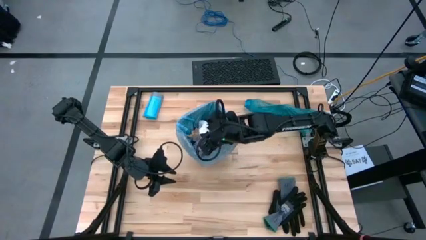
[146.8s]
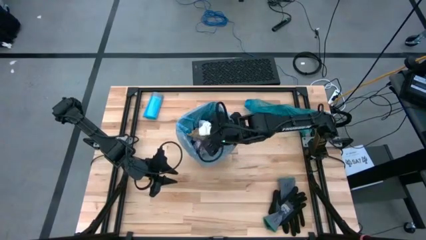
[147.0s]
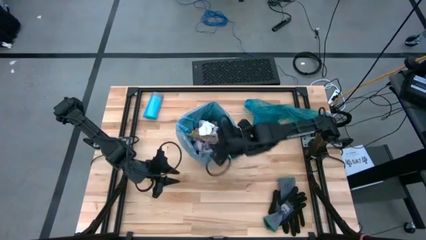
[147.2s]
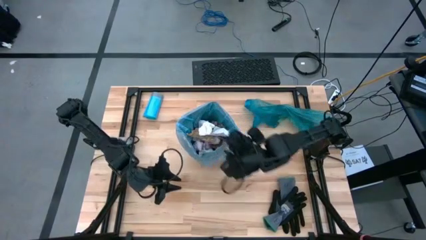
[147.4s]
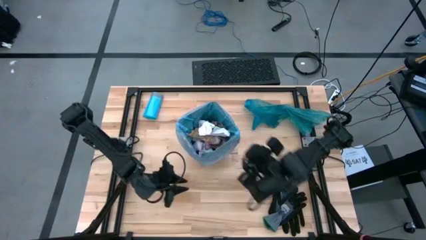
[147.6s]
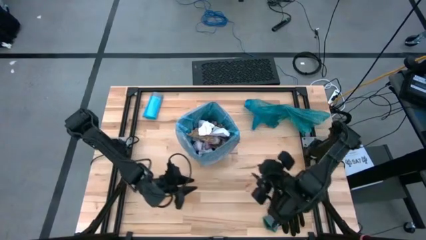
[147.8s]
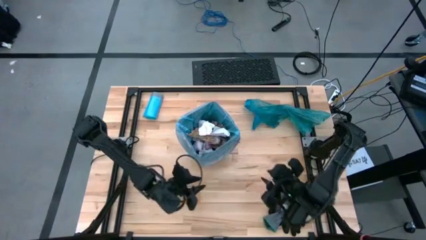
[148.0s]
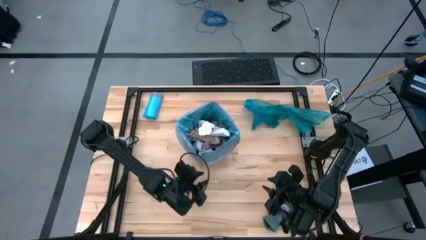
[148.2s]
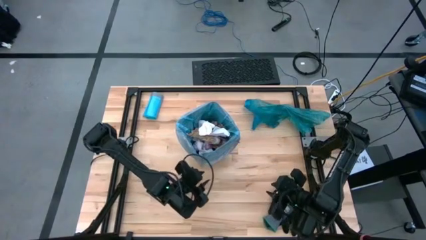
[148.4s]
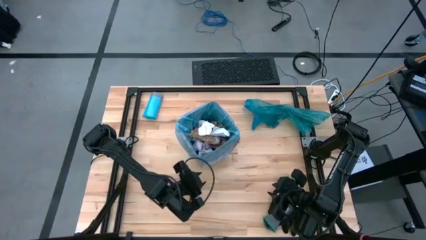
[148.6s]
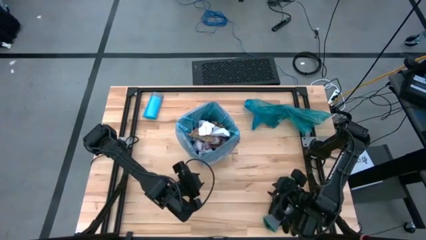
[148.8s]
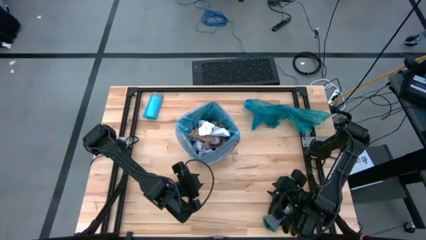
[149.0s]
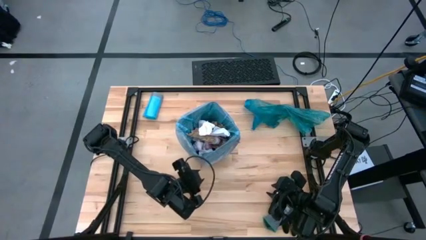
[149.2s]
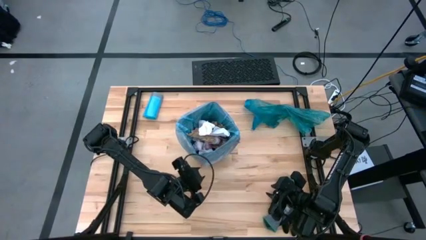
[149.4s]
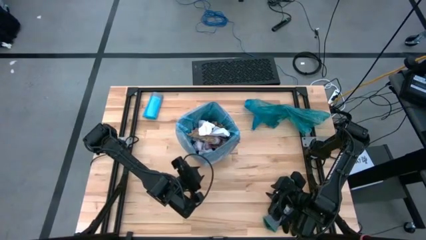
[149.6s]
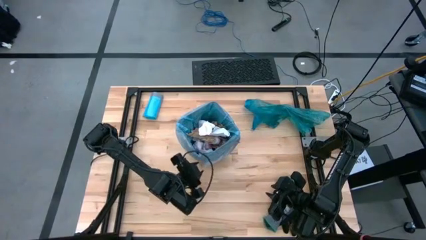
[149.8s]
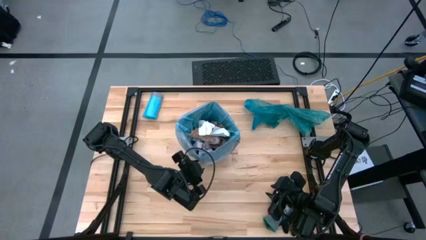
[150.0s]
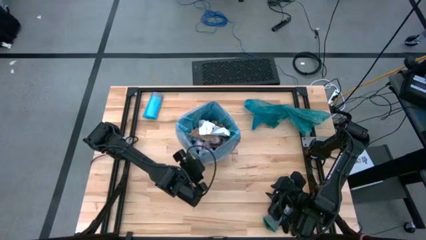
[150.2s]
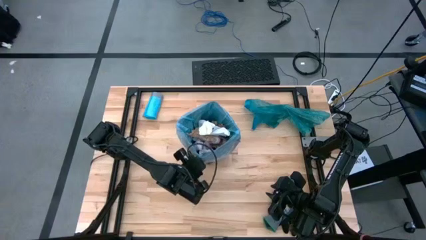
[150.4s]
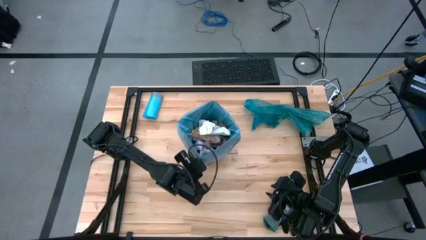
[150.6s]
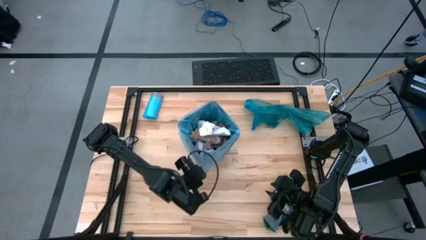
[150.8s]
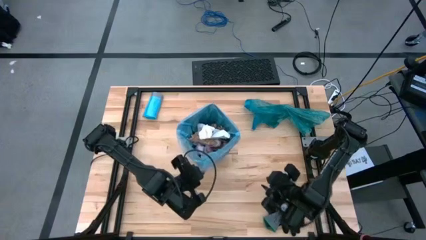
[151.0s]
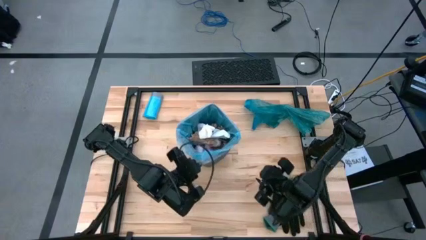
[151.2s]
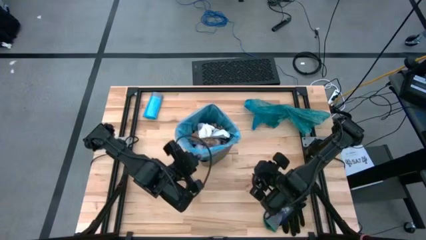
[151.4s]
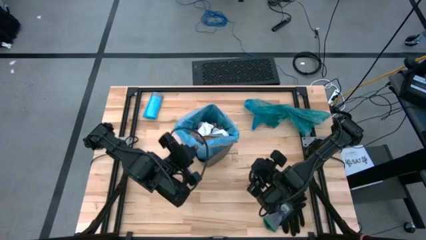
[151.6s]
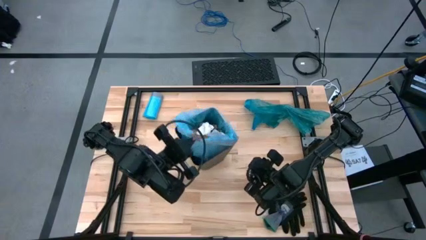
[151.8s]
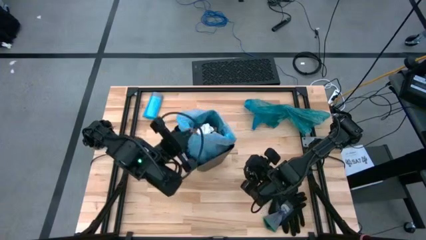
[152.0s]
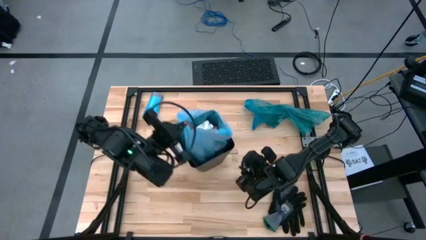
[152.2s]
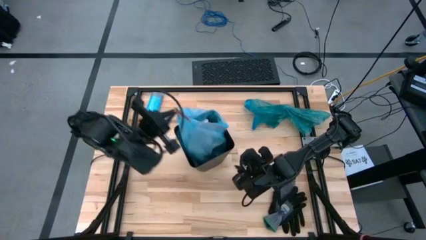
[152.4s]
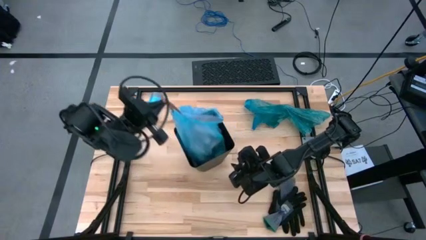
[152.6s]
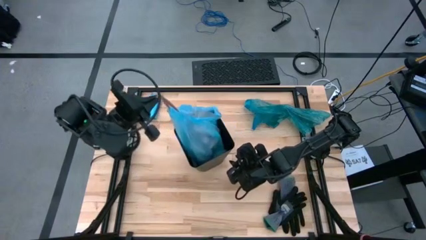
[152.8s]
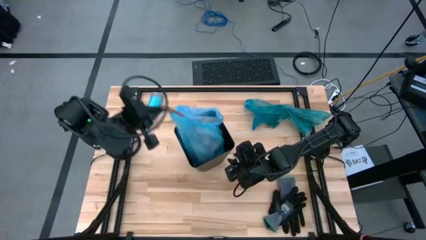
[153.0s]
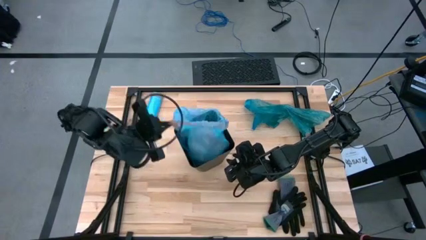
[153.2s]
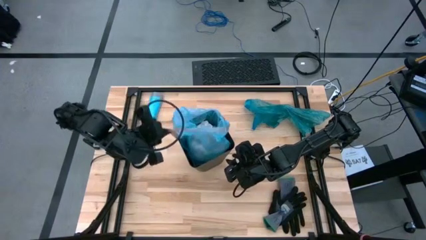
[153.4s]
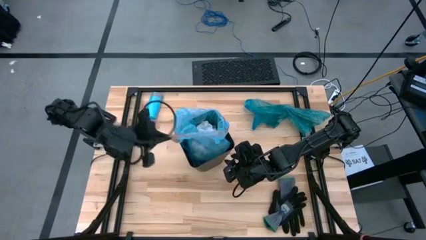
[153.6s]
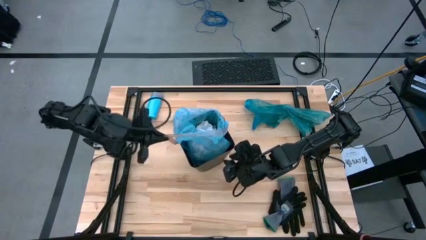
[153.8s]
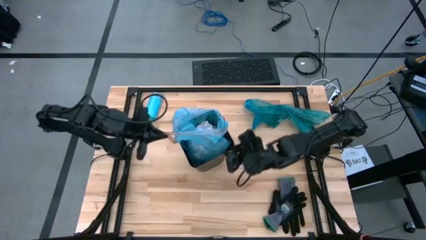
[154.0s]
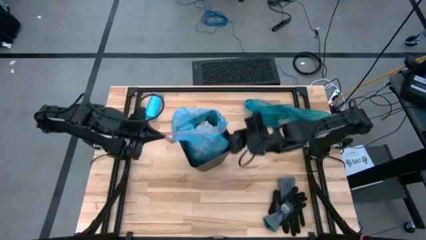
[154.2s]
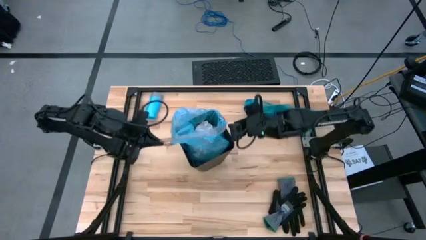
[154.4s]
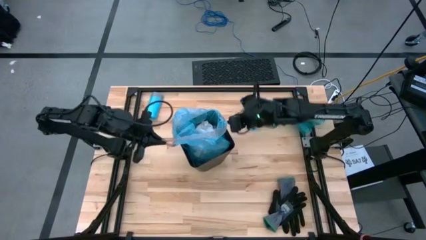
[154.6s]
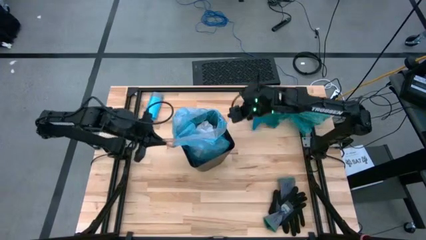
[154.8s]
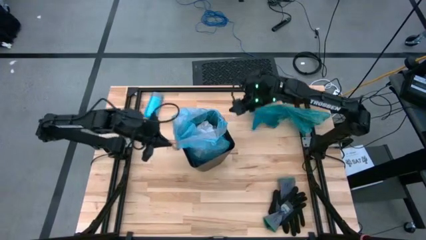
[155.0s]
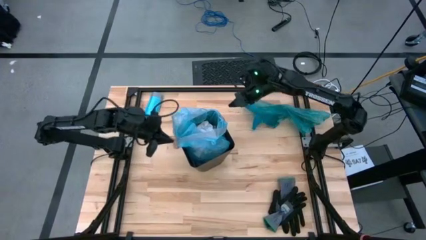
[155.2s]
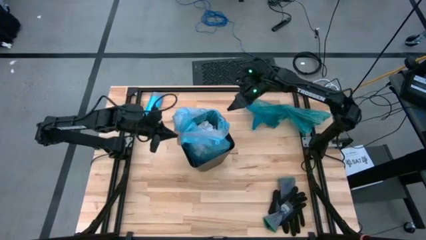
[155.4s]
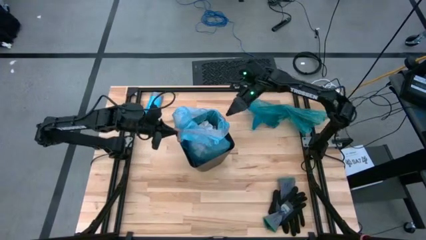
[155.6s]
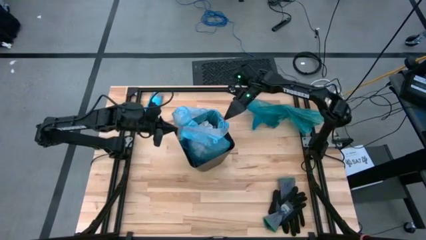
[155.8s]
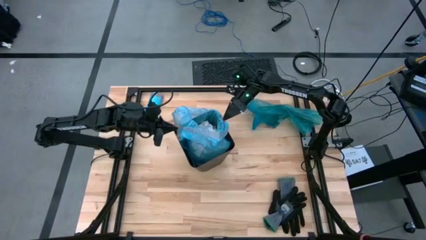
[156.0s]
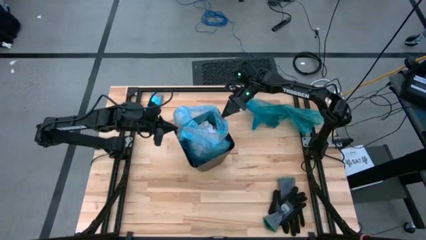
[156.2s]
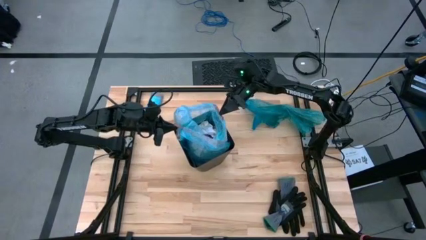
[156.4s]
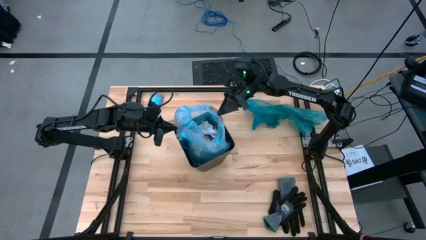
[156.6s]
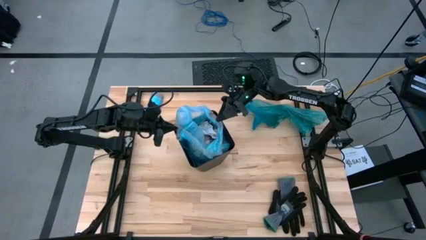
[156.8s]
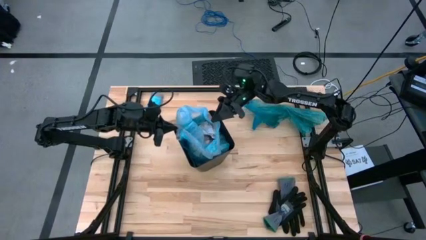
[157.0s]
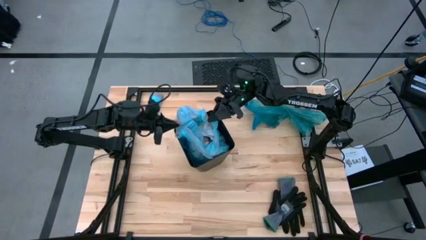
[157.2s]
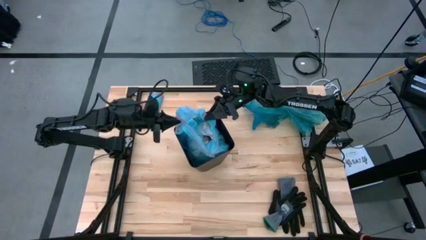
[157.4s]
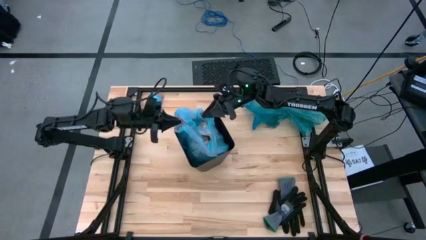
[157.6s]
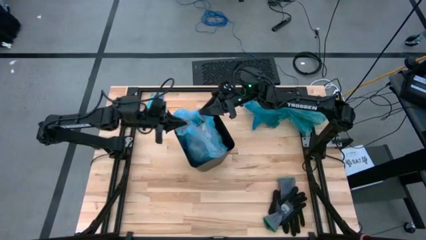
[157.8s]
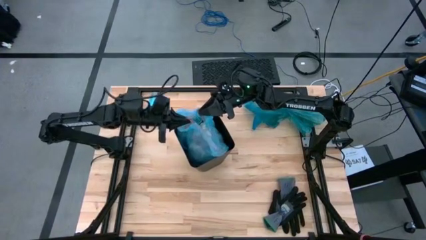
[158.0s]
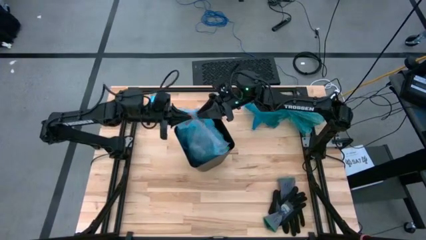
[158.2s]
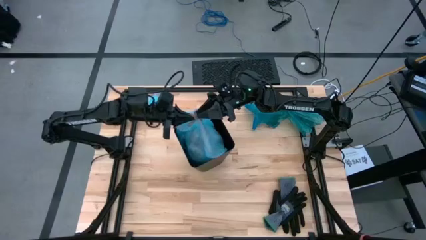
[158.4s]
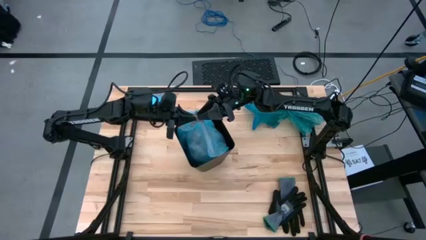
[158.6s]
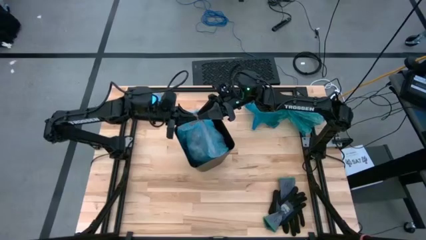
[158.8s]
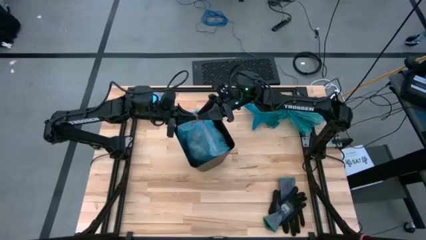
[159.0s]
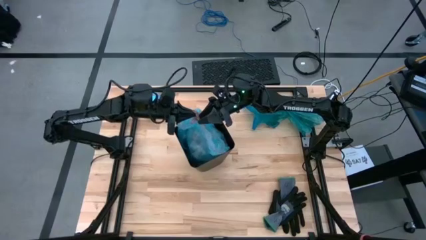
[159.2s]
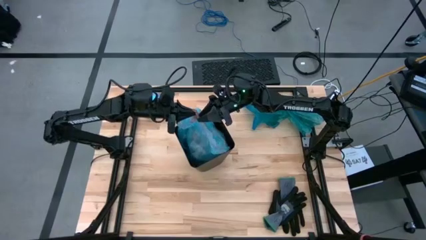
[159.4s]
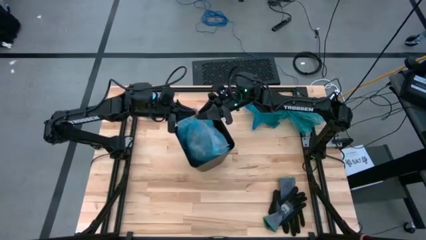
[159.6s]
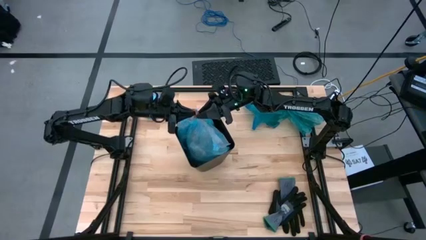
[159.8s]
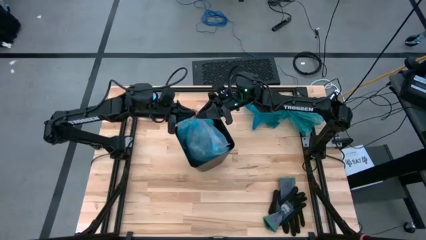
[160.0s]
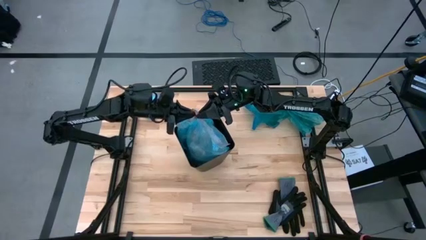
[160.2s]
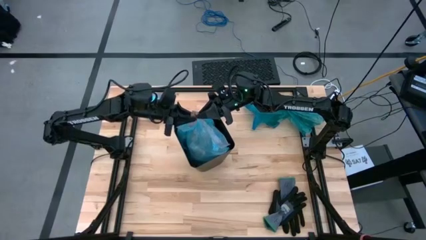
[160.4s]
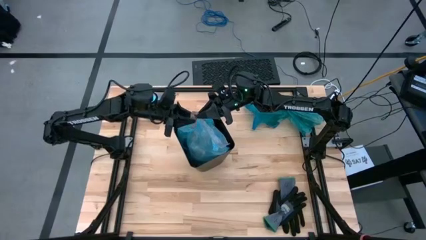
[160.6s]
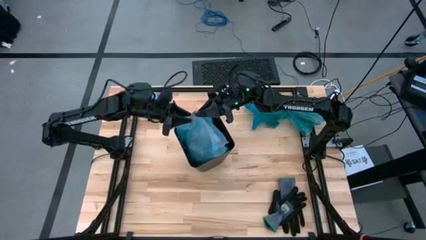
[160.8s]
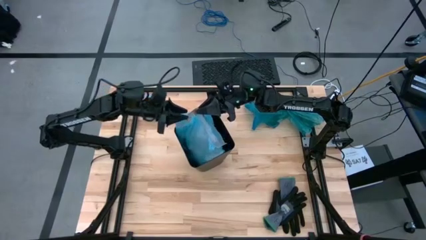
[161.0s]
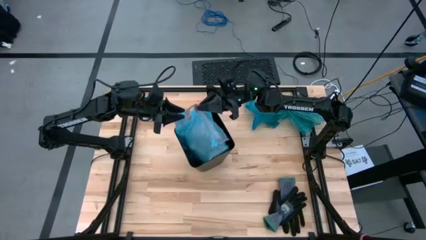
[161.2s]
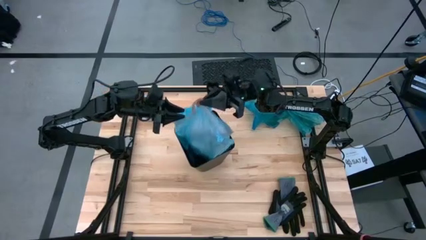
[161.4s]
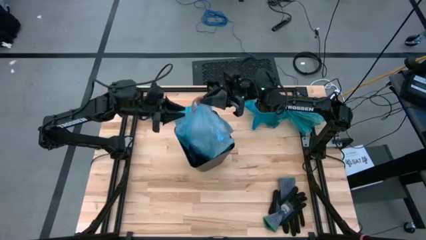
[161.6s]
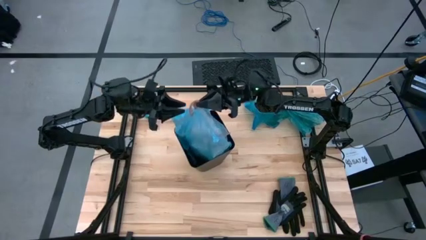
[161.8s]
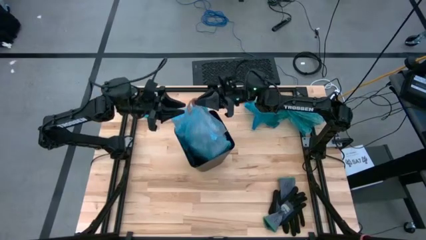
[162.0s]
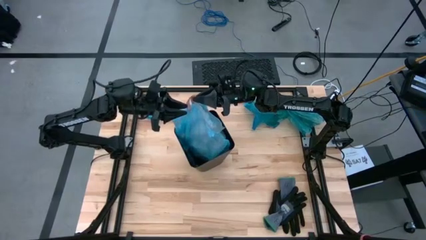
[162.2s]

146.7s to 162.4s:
Task: place trash/remove bag and relplace
Remove the blue trash bag from the trash bin
